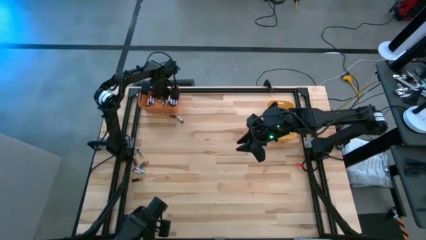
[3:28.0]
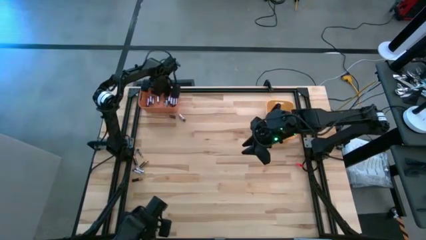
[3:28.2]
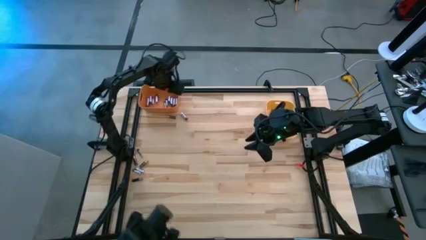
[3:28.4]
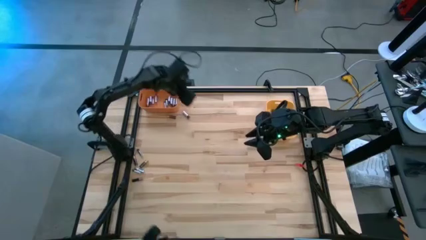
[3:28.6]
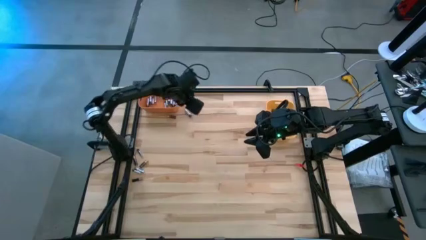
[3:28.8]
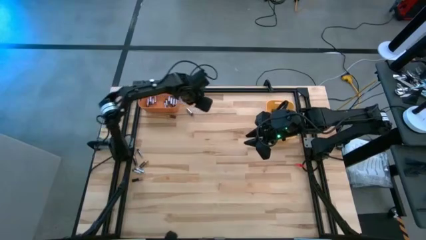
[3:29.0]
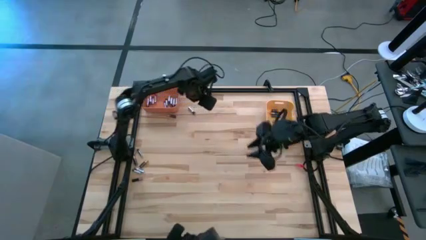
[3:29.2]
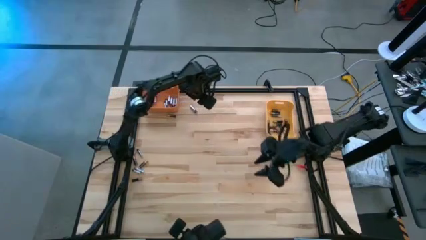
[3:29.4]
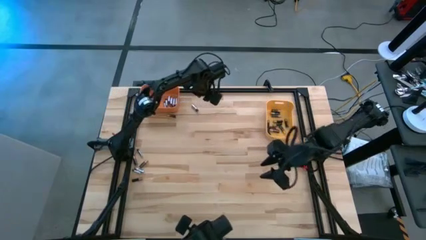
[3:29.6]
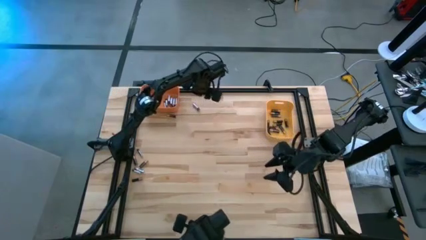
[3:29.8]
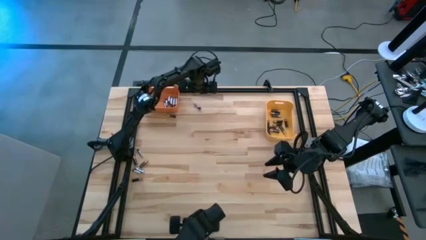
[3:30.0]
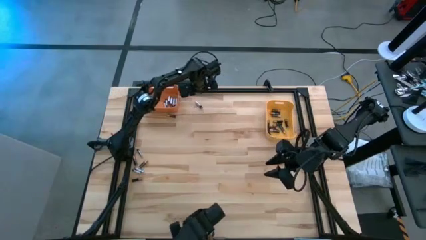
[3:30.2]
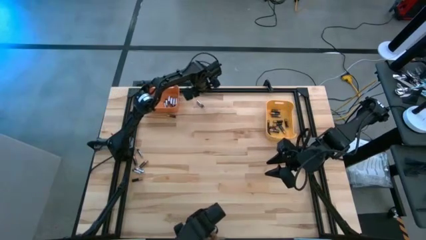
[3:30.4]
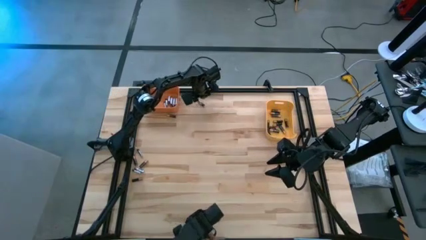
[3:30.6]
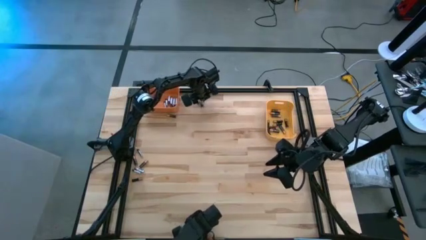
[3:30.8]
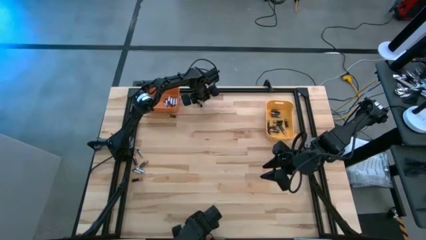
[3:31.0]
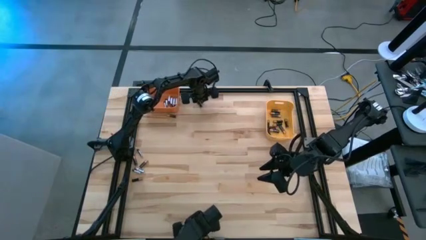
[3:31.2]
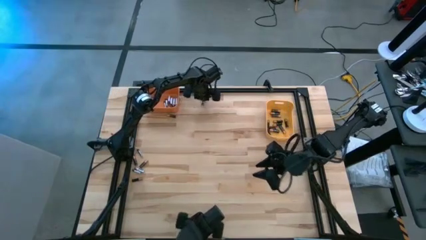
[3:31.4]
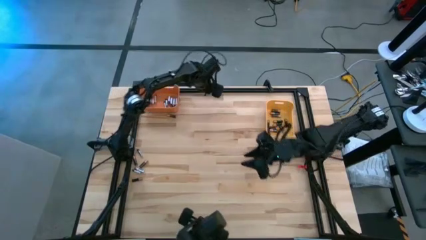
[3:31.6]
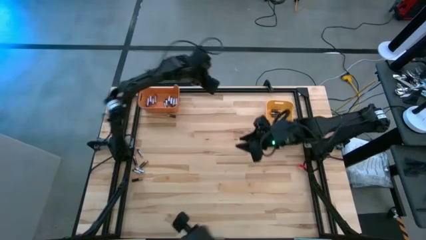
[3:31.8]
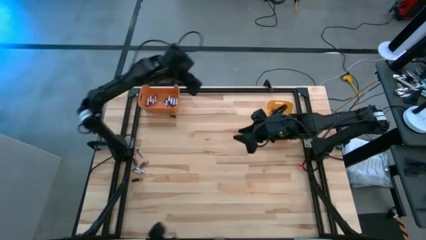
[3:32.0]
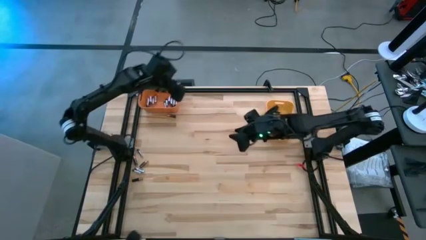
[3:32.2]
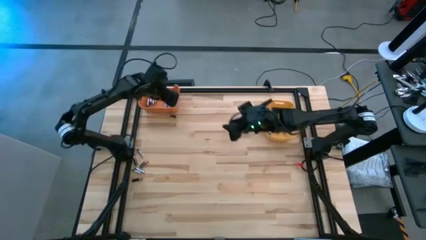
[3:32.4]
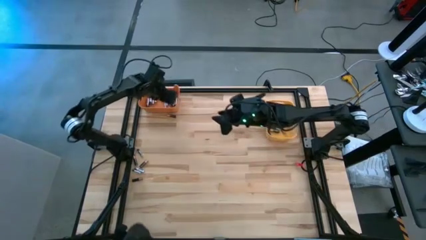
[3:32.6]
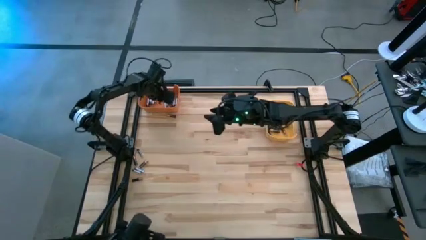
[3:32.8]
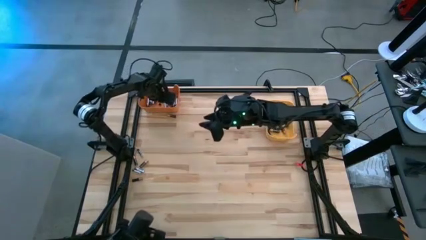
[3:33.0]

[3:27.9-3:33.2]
Task: Sort batteries
Put the silver battery into the orange bin

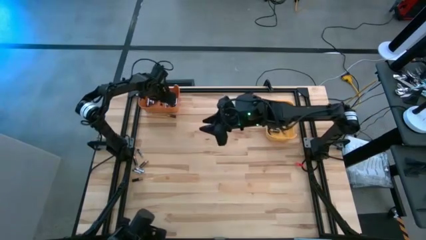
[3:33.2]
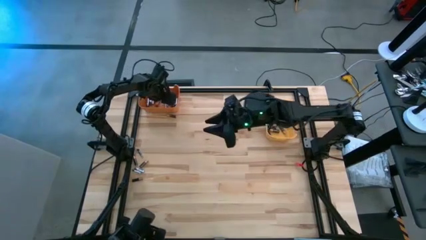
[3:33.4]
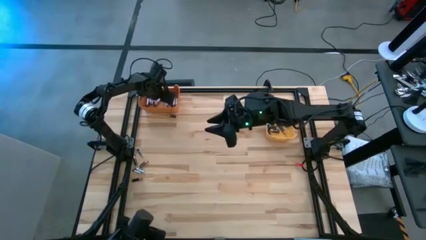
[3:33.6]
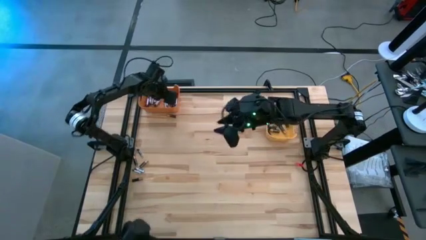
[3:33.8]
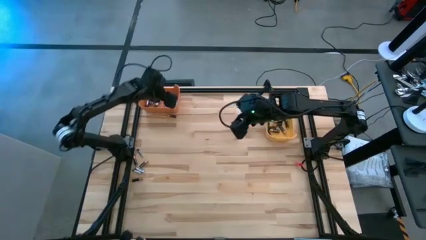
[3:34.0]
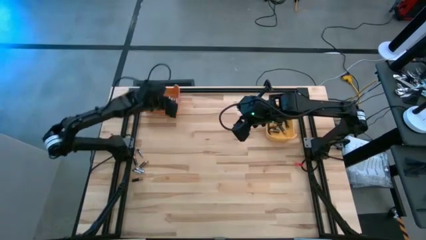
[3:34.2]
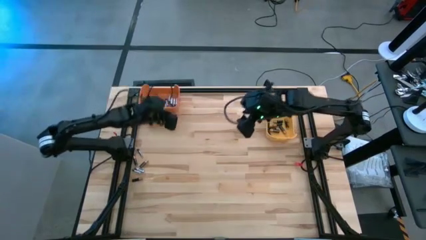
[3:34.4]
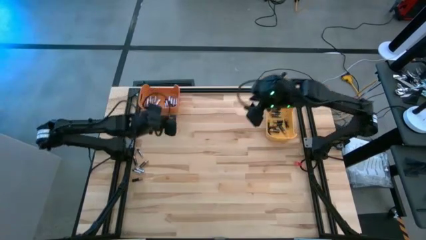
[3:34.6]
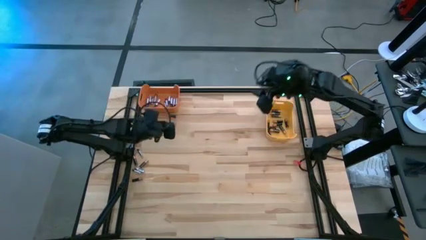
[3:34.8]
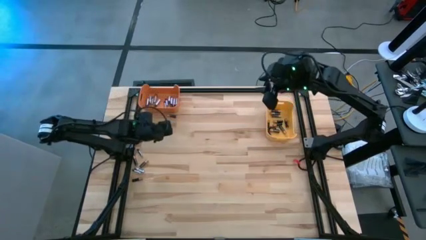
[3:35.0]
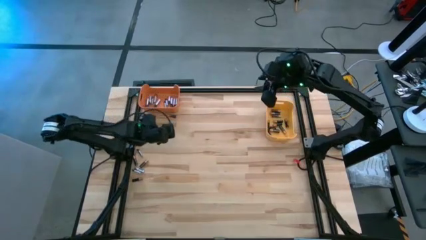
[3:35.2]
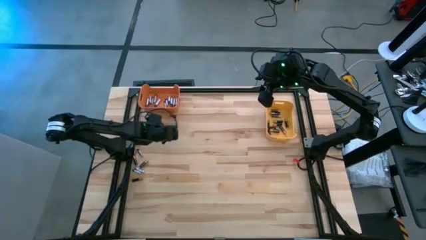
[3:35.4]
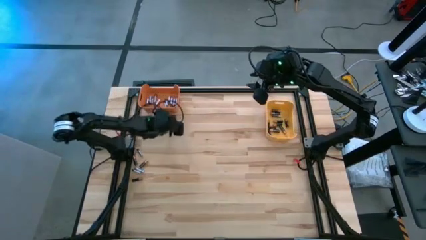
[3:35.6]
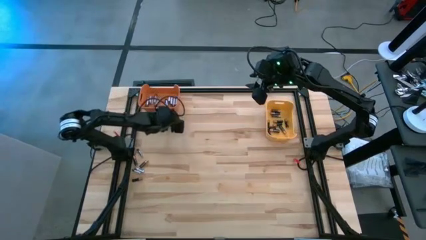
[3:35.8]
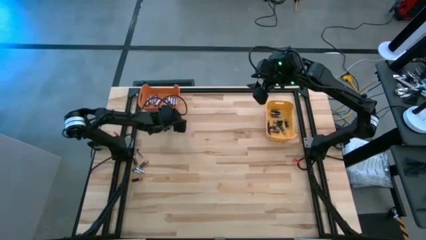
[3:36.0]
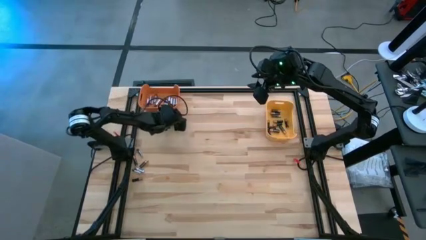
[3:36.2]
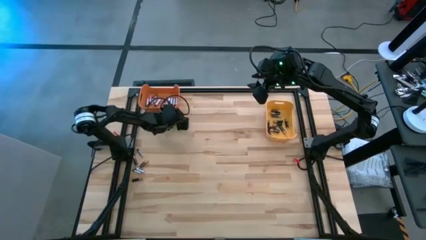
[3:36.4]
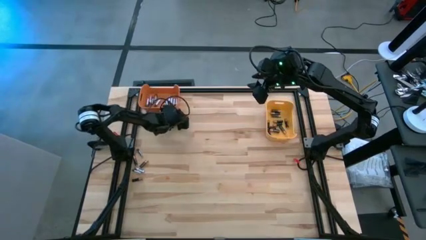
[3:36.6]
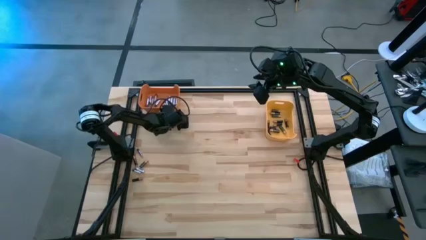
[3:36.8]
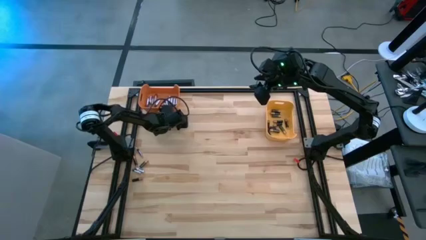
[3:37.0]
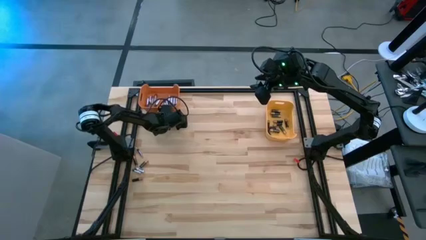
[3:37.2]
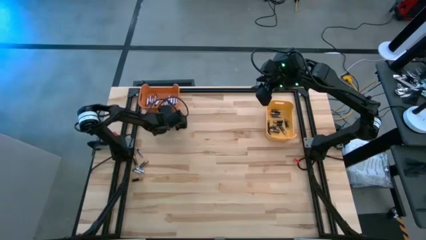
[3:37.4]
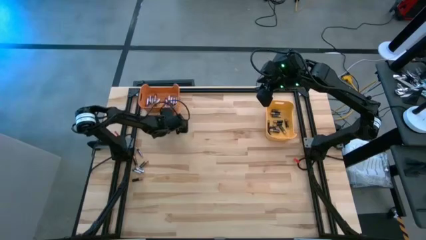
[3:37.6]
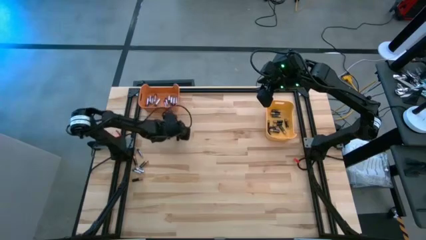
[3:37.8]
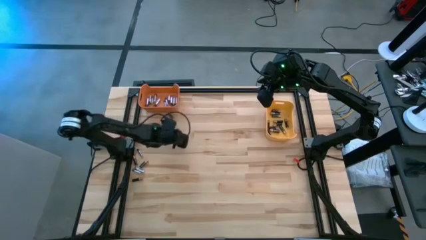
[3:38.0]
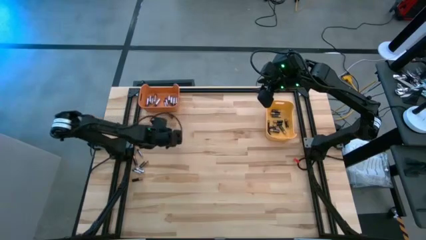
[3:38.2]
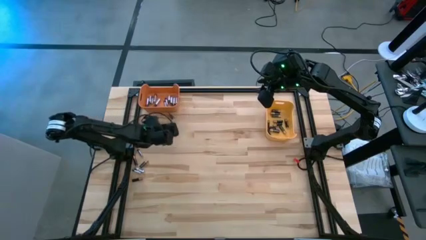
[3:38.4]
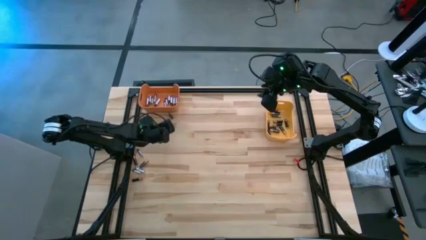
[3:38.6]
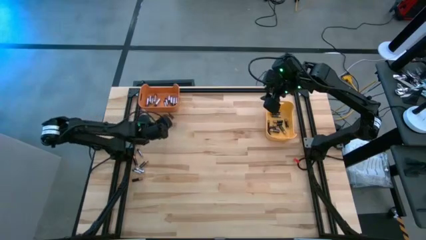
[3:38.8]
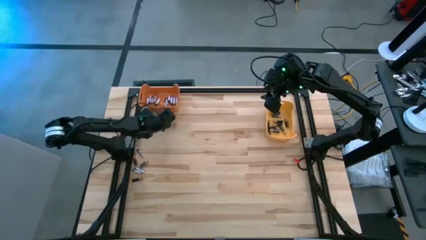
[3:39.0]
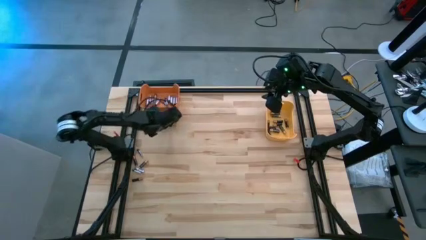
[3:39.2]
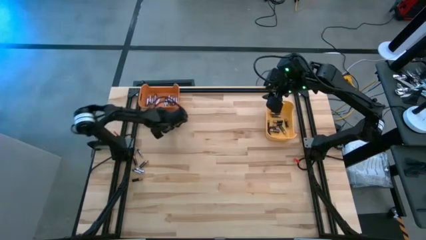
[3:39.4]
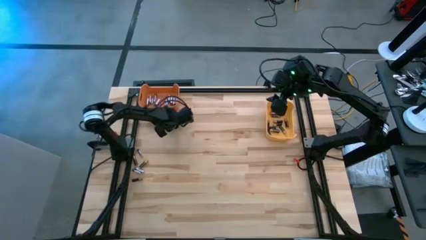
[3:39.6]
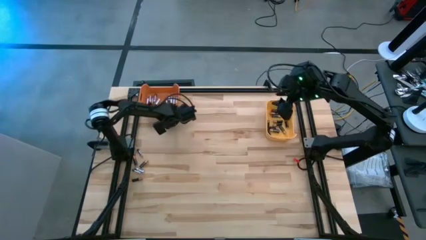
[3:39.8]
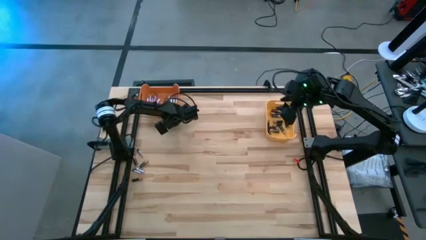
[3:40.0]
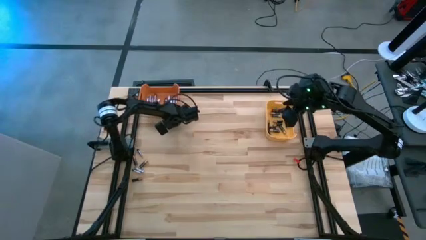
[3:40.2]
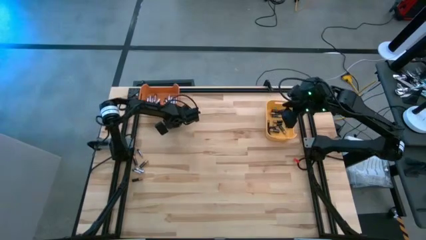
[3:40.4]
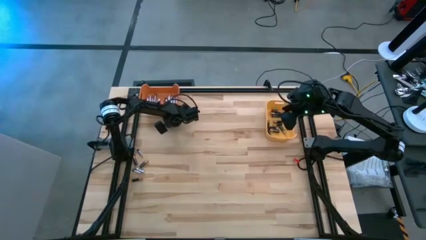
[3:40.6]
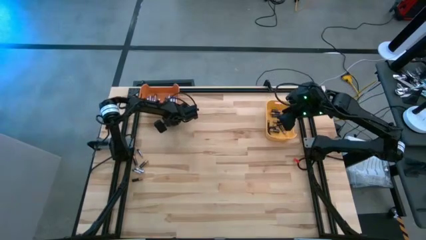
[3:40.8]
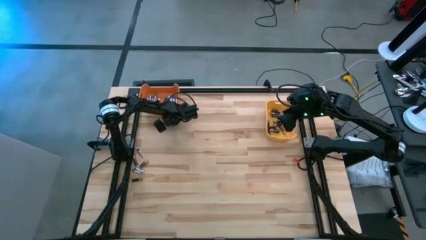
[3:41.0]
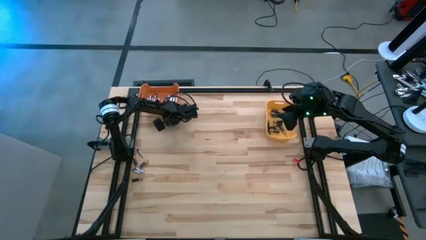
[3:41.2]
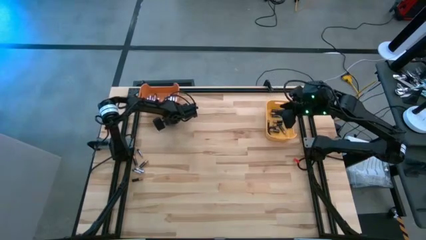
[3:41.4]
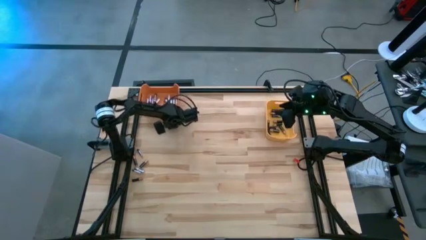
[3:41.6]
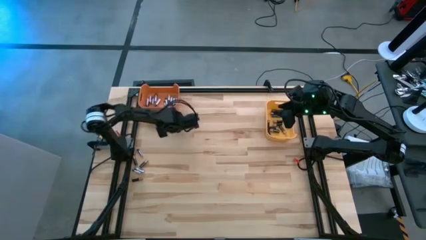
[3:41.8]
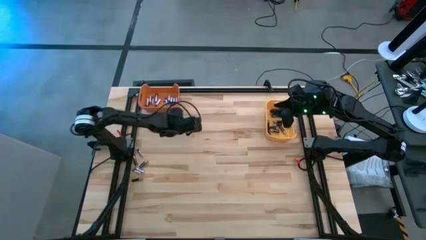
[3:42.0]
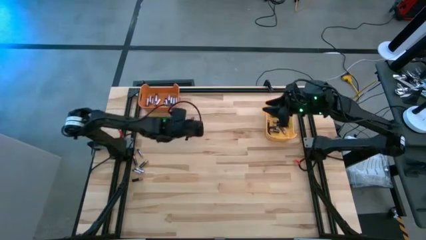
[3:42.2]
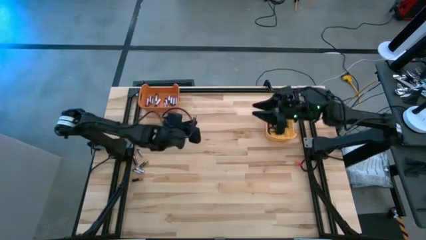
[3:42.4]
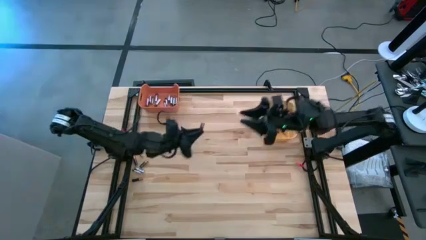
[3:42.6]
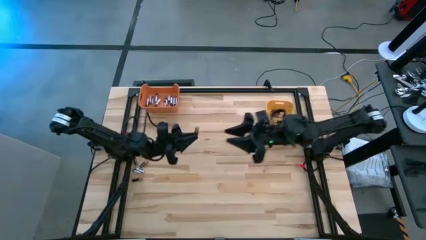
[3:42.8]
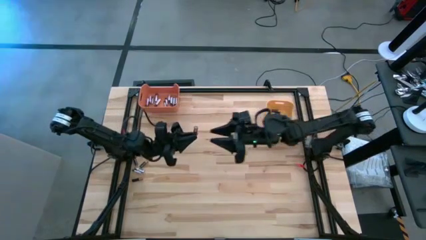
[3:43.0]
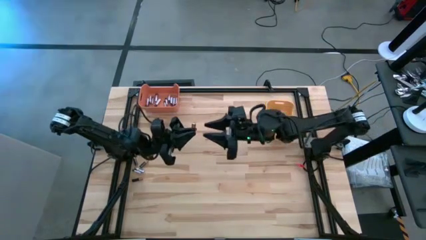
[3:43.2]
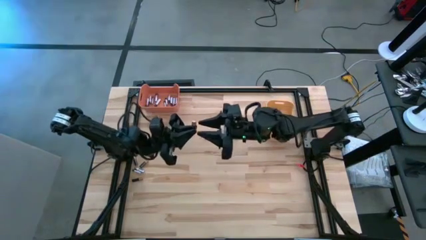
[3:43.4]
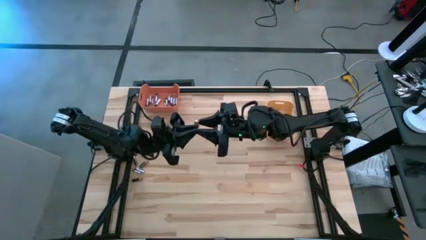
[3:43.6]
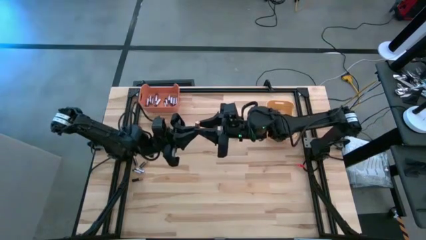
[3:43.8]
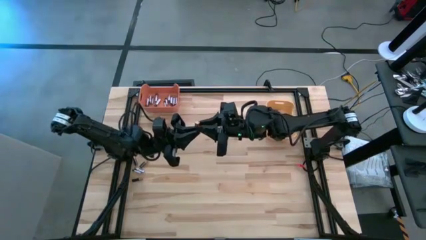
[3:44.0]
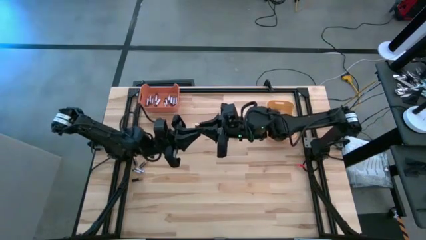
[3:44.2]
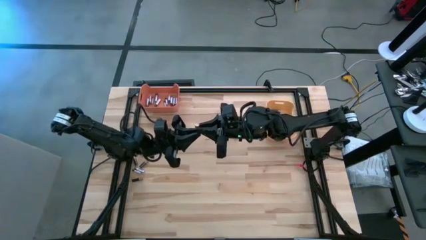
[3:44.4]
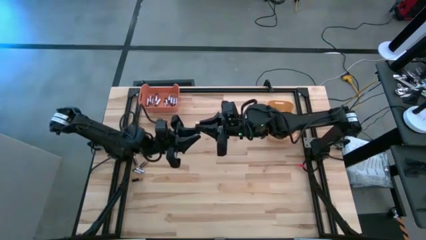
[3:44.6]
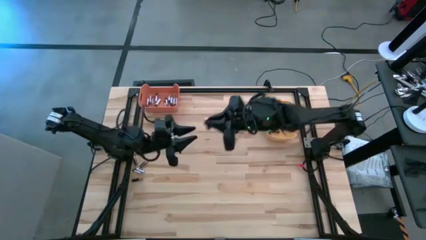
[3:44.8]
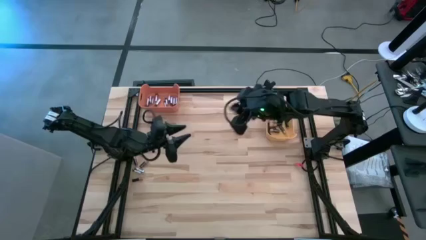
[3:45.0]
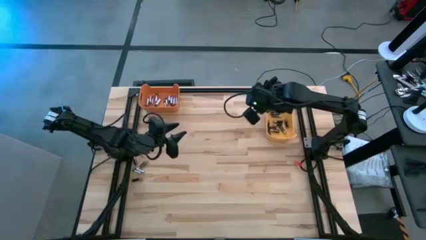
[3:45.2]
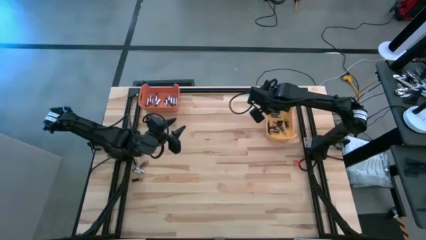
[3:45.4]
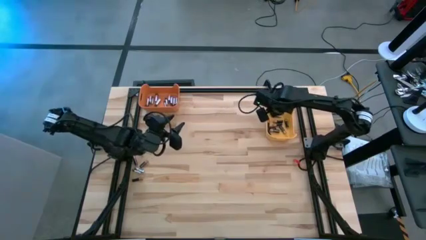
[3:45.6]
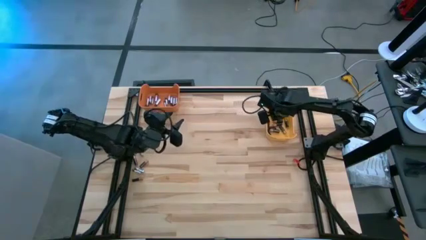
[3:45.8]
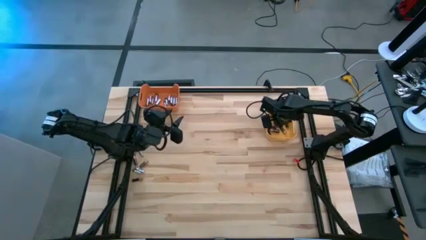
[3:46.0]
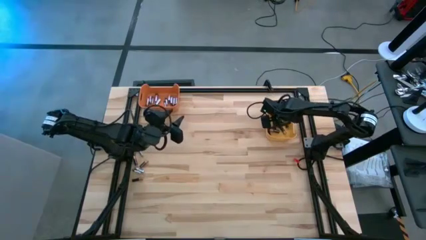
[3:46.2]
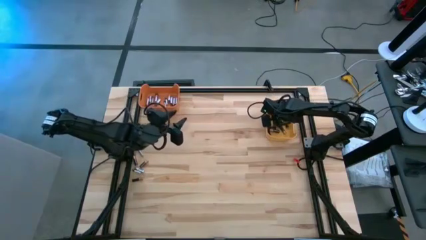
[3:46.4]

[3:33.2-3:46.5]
Put the black battery into the yellow bin
